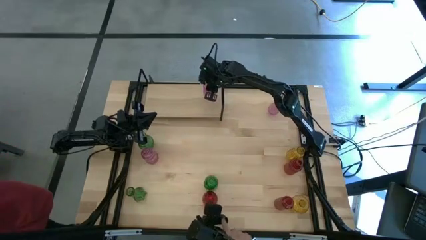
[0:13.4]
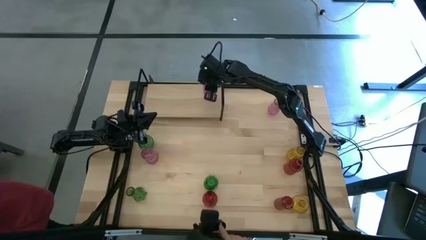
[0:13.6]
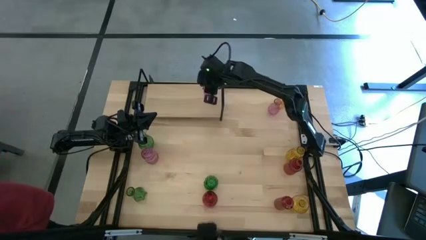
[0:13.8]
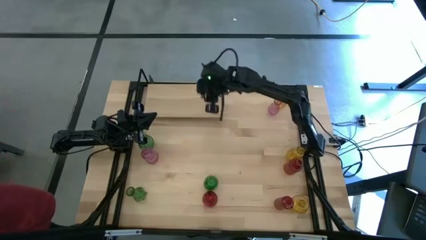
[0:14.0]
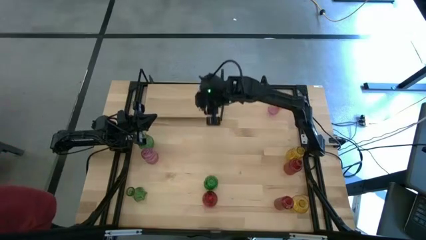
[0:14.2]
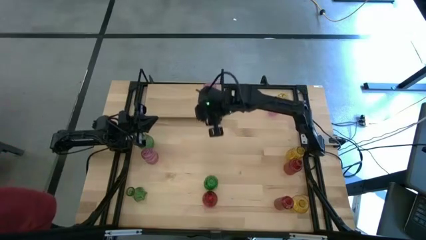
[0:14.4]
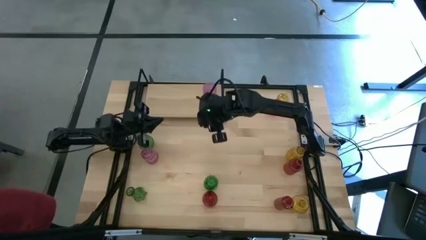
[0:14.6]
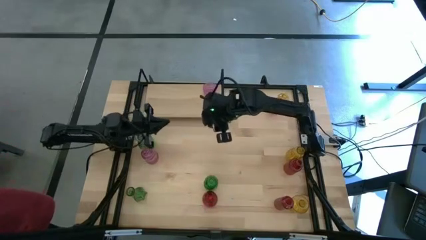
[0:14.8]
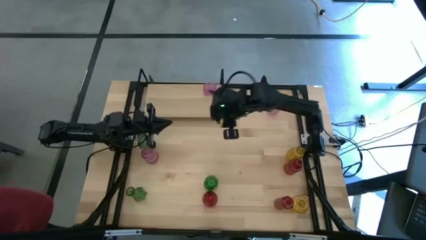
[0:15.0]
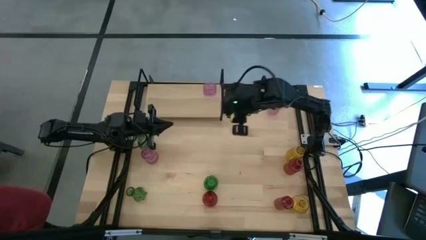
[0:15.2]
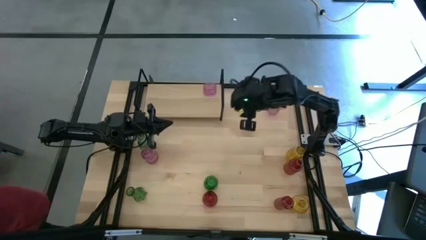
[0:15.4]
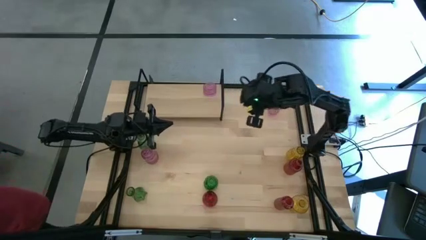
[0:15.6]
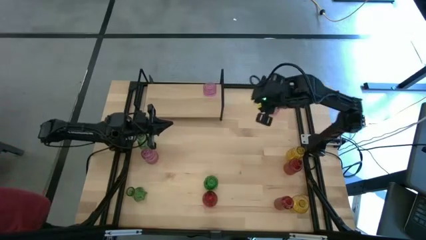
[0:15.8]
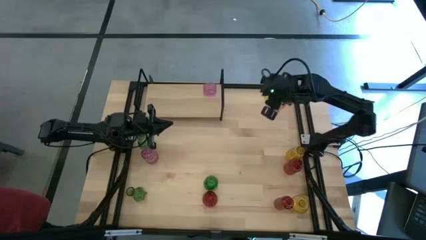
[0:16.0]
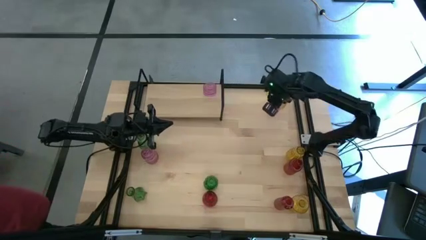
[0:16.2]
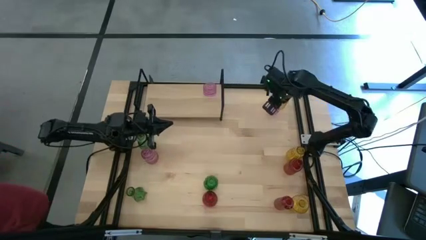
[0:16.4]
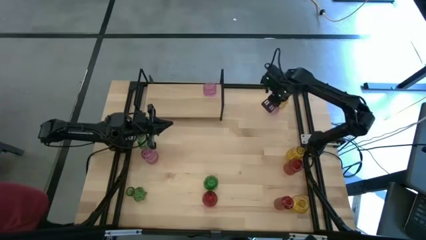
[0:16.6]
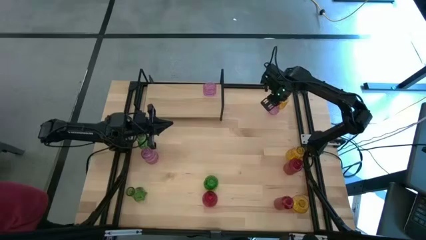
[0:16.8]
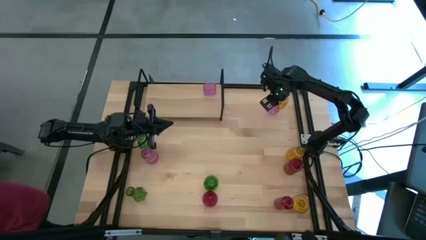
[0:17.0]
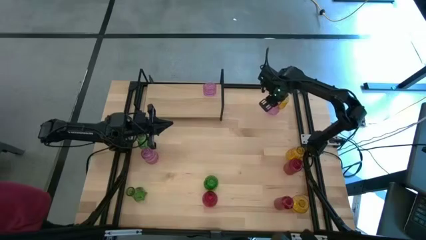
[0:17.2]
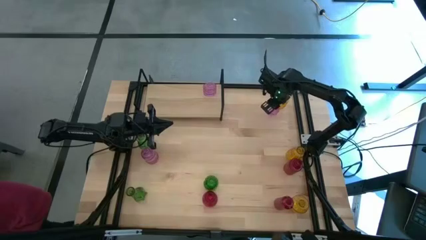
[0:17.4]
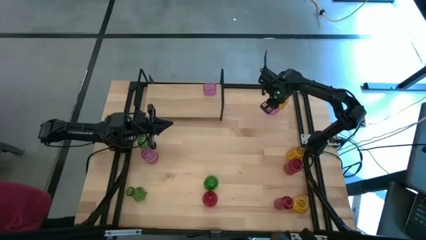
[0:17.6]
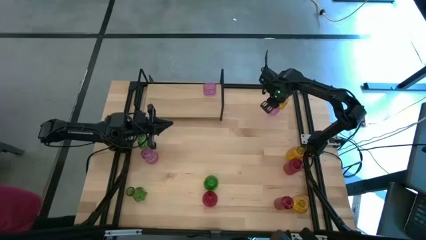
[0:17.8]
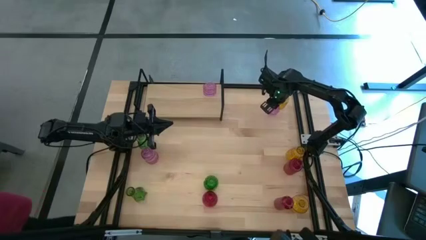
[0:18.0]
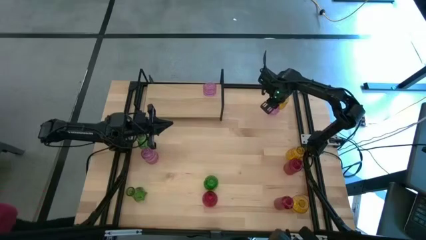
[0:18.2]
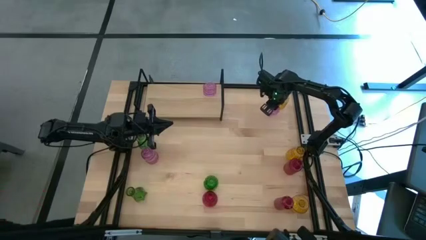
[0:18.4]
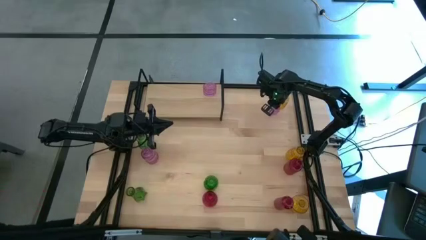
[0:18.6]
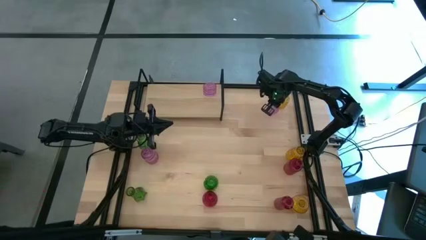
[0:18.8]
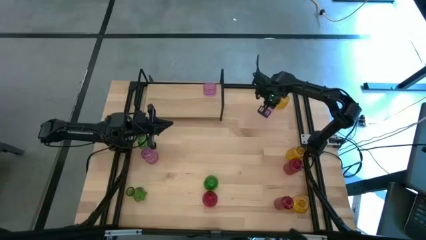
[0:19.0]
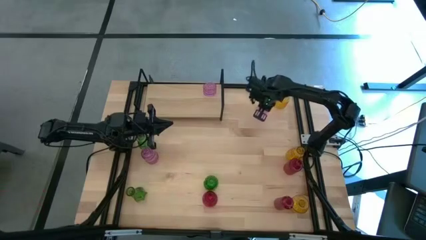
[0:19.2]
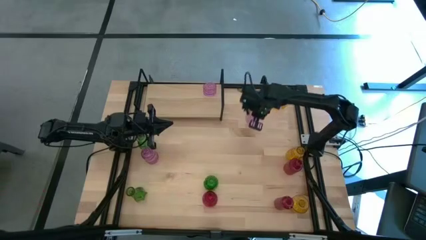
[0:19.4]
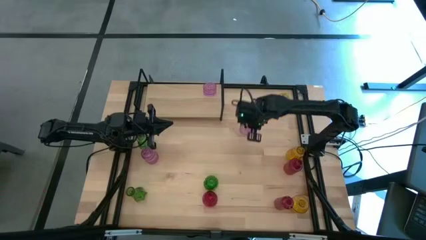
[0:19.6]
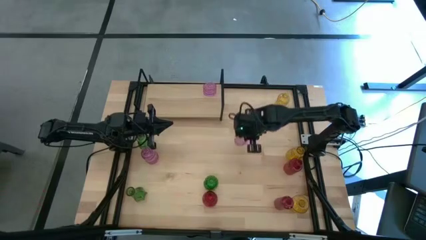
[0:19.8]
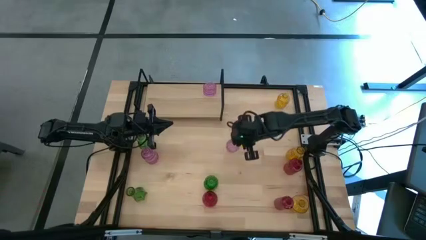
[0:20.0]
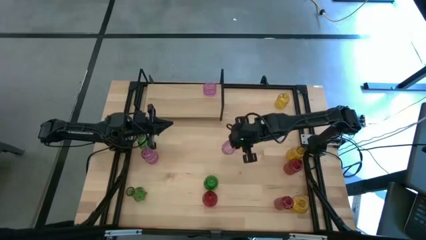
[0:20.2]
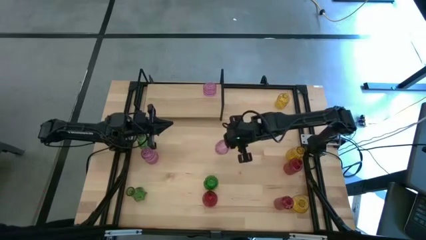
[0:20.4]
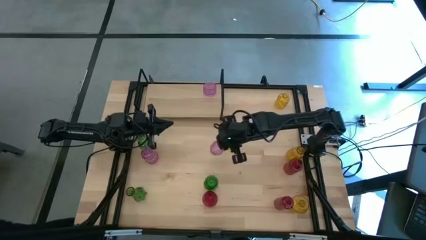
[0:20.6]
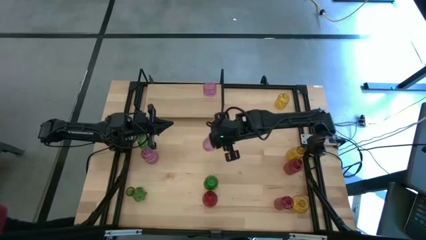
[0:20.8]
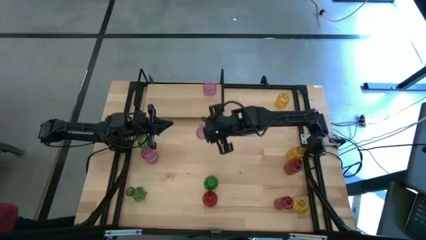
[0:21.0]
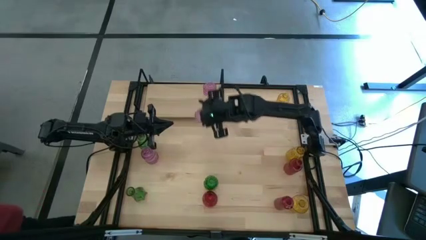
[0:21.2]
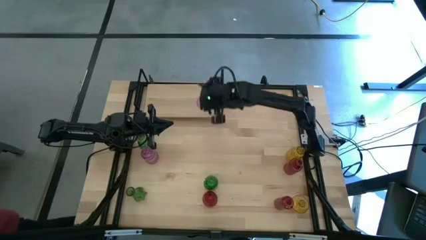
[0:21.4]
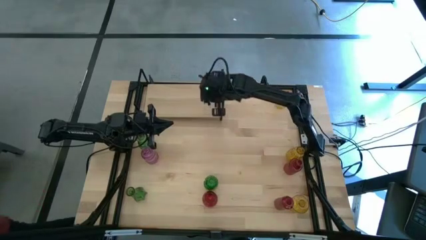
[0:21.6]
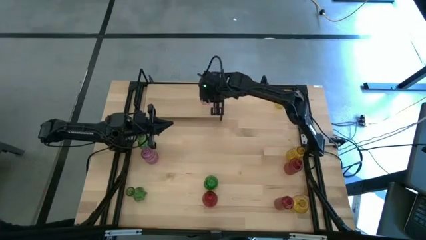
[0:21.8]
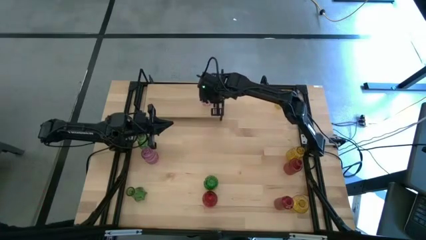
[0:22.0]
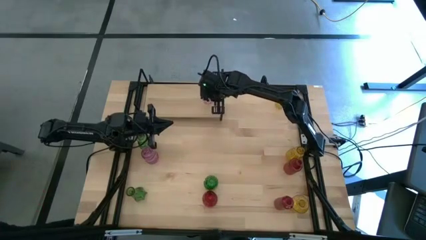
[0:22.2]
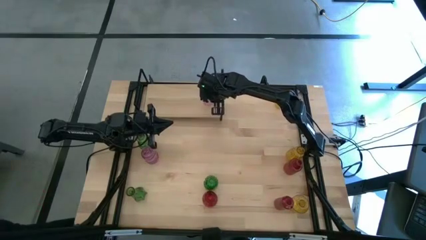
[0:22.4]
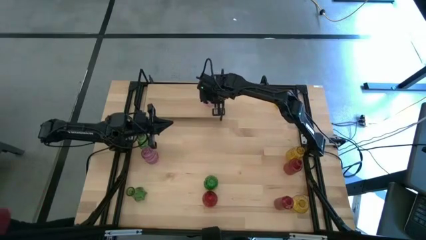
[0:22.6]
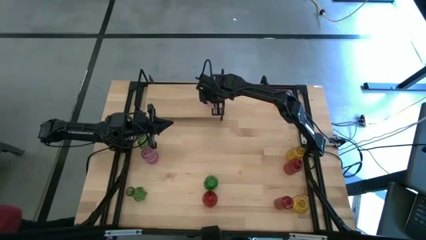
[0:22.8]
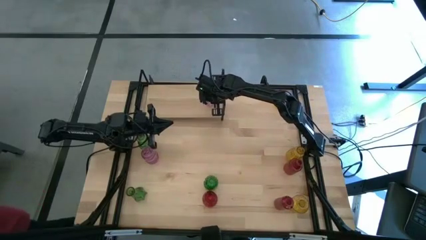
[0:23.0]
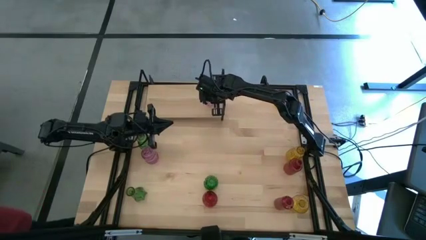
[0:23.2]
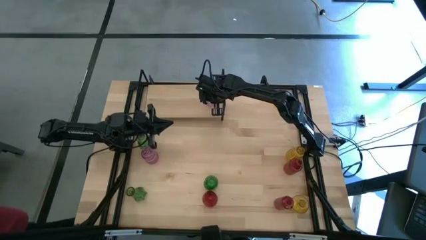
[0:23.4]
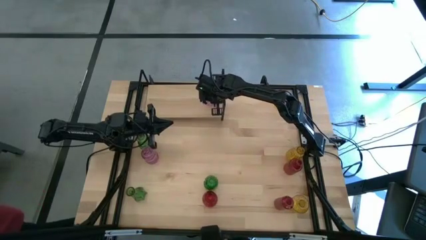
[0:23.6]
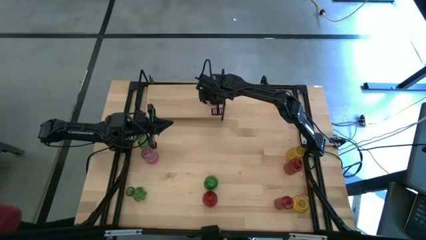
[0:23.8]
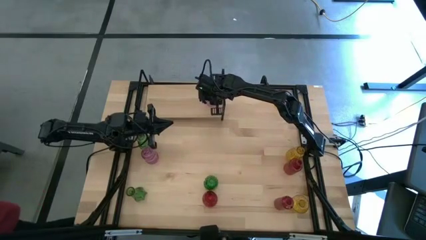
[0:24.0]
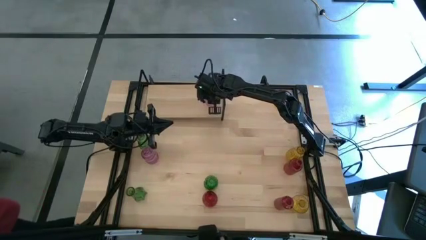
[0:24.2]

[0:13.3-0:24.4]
Task: sort vases onto shelf
Put the top violet vase on the shelf aligned with the other violet vase

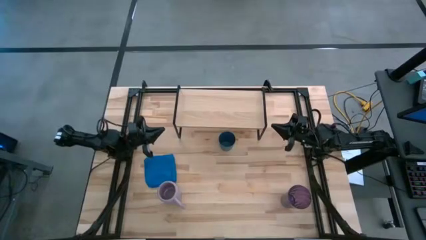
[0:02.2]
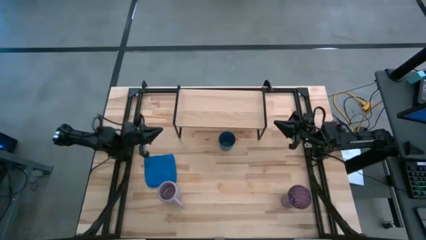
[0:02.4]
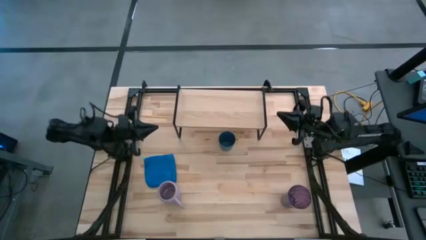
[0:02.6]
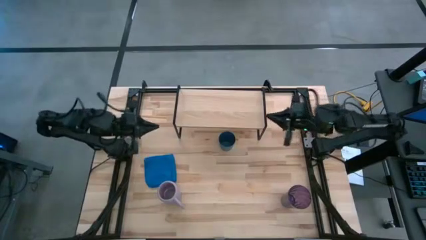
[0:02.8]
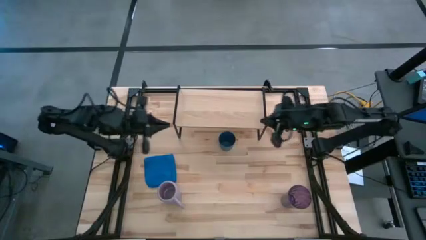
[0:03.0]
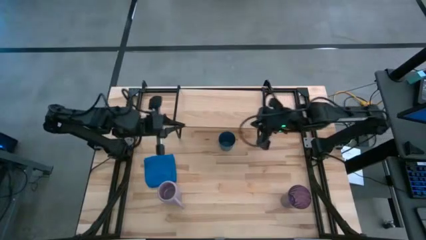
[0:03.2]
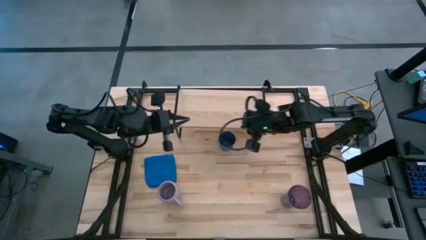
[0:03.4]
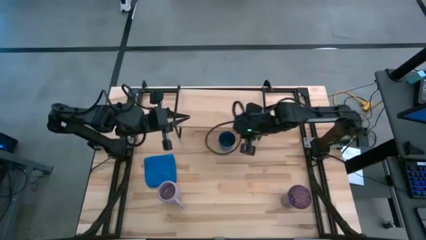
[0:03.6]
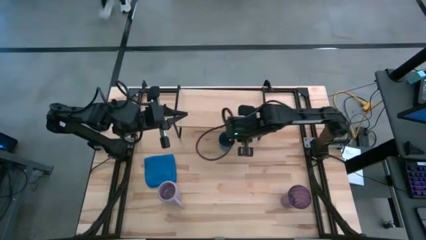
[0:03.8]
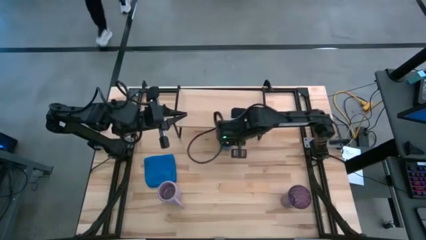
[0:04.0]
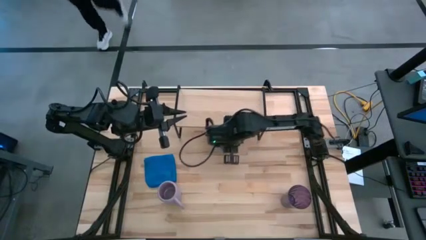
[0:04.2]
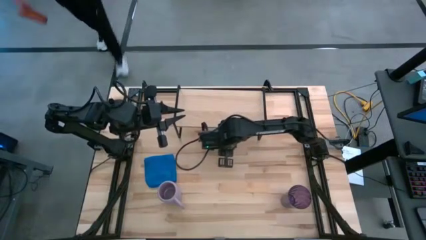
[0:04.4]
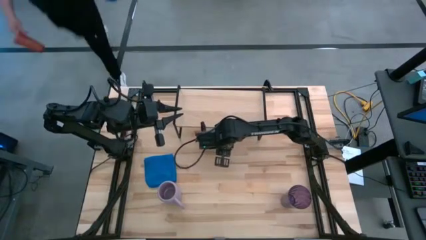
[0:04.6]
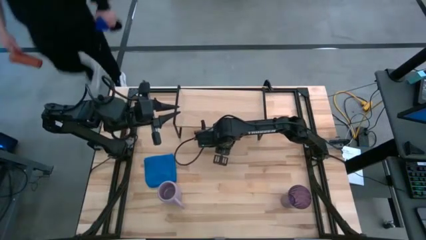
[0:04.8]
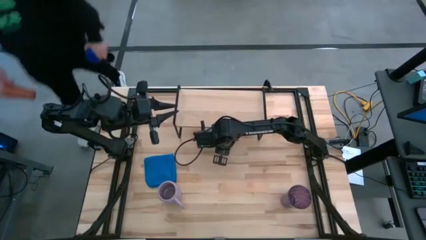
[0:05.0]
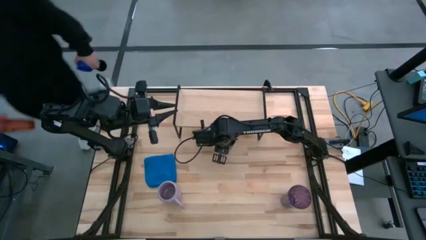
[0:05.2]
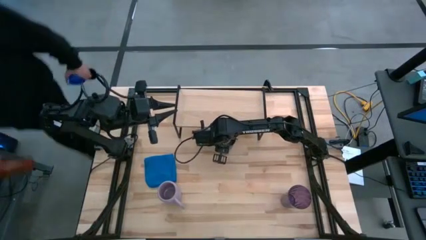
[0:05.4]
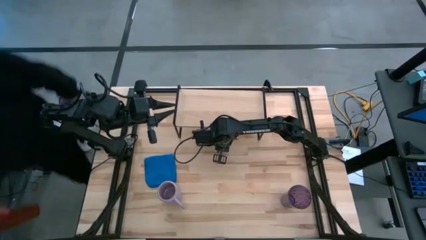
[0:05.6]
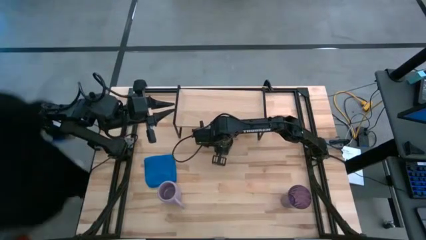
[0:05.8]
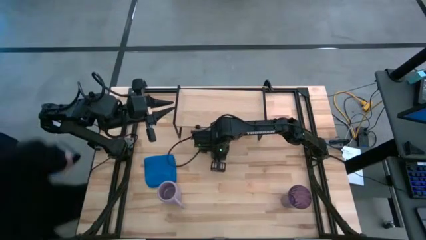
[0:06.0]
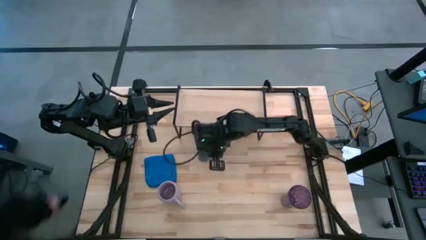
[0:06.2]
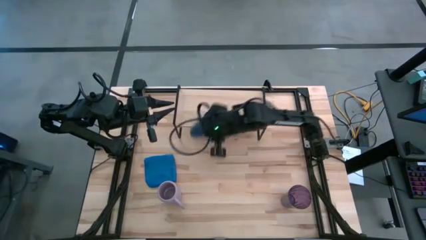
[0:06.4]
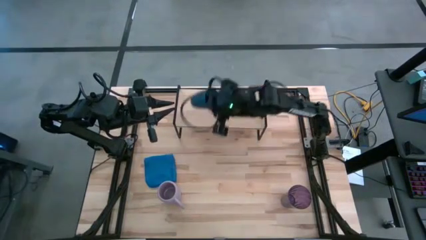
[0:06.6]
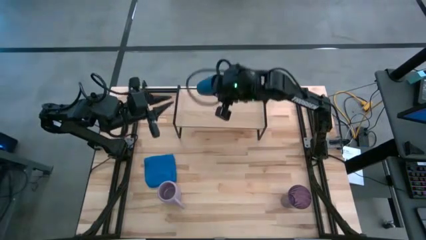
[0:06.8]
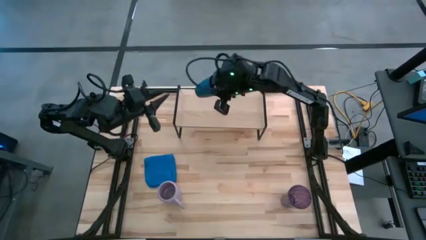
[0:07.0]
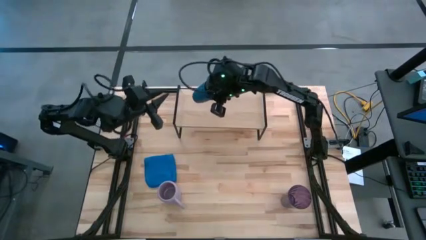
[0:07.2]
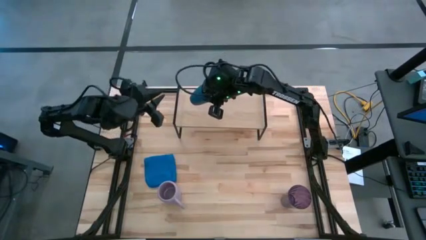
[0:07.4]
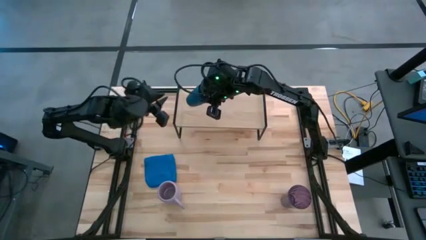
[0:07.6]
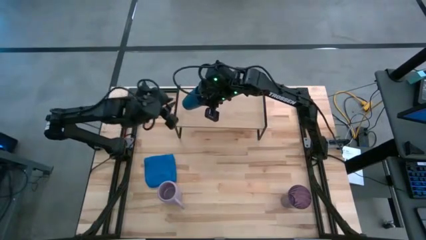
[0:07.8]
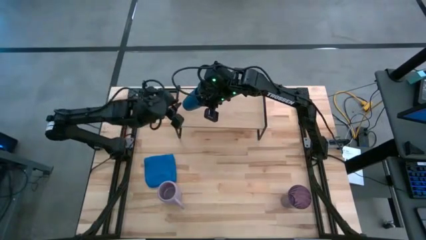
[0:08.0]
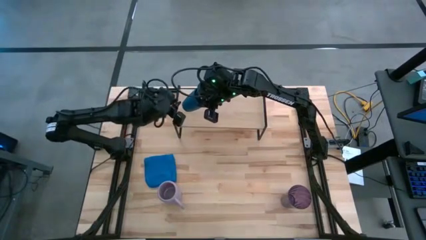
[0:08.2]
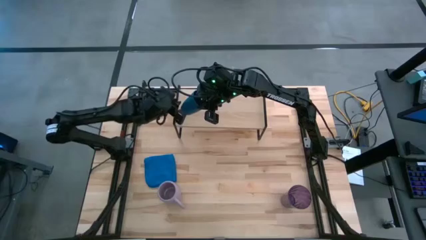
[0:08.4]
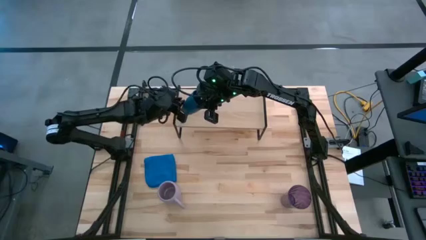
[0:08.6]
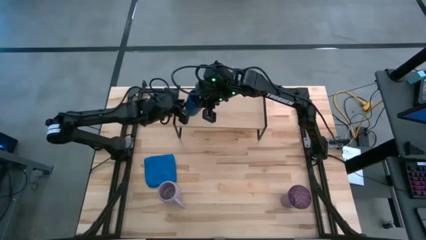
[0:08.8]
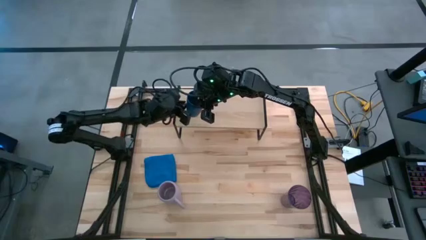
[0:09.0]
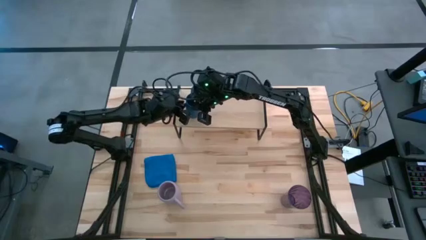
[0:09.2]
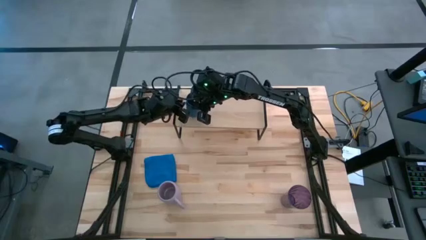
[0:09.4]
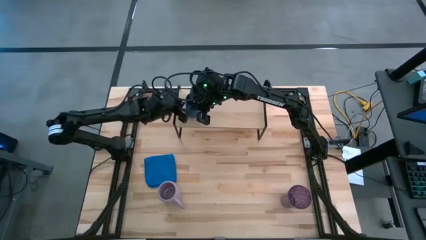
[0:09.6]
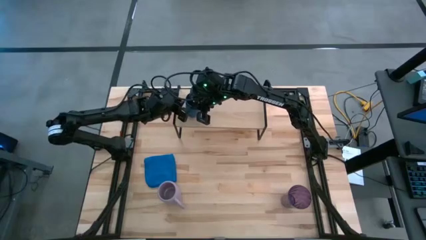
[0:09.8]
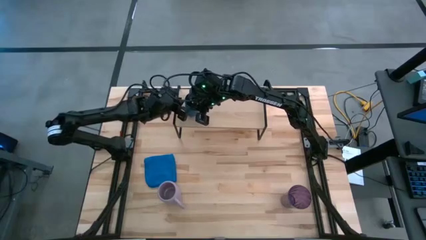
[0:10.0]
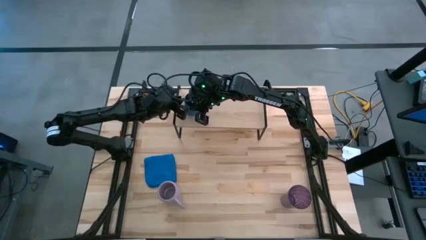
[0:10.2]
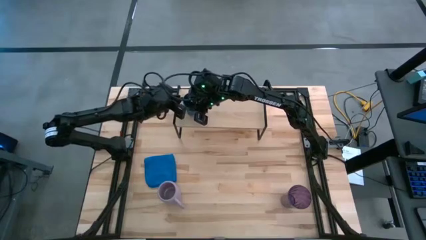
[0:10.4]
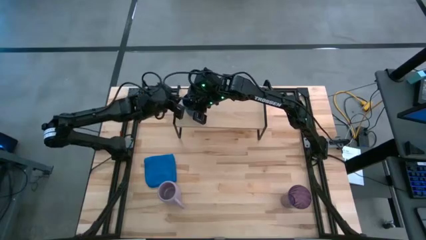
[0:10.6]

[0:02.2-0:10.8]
Task: Stack small to large cups/mugs on shelf
Put the blue cup on the shelf
